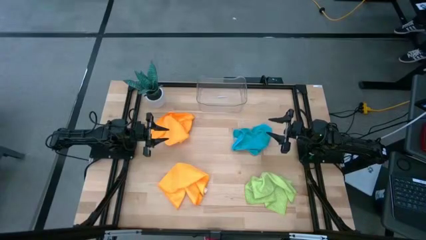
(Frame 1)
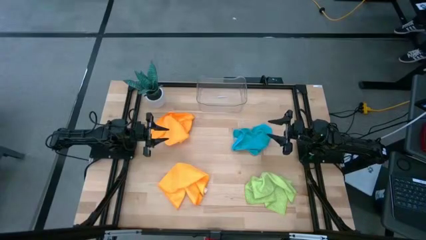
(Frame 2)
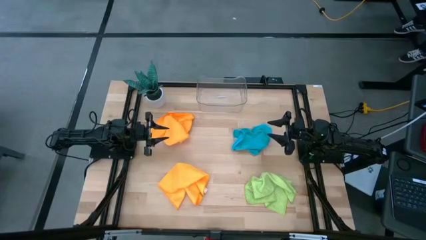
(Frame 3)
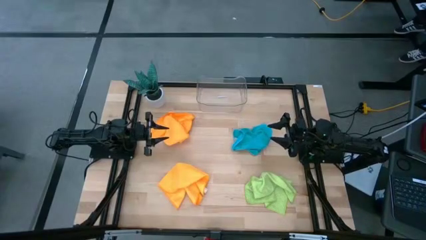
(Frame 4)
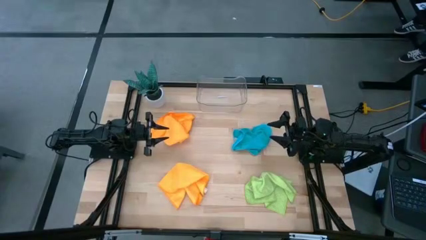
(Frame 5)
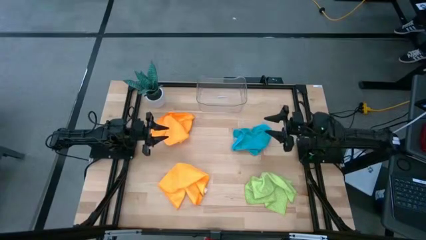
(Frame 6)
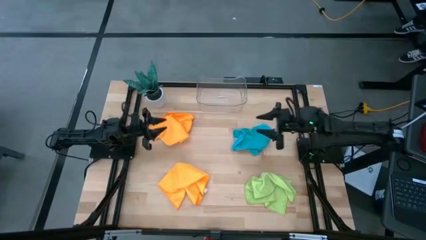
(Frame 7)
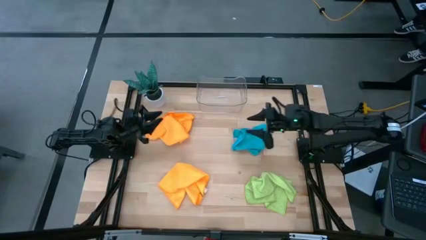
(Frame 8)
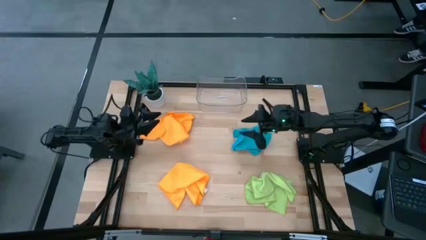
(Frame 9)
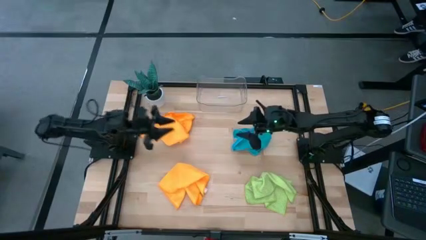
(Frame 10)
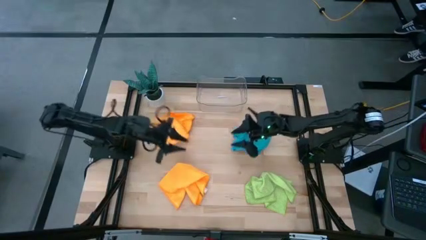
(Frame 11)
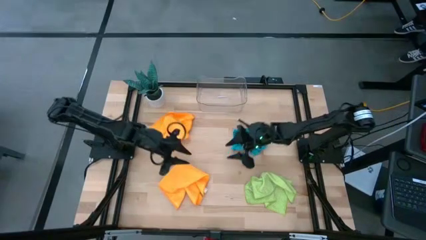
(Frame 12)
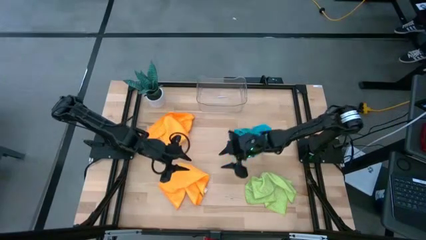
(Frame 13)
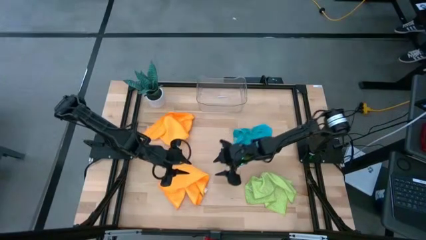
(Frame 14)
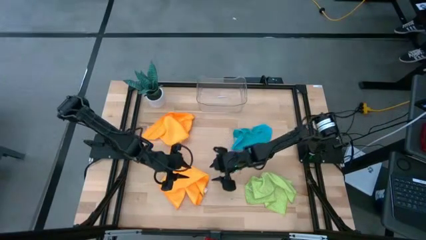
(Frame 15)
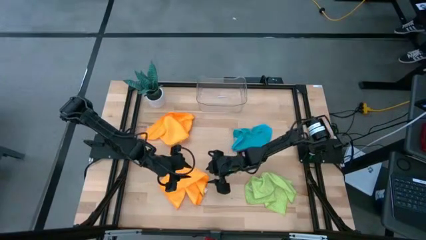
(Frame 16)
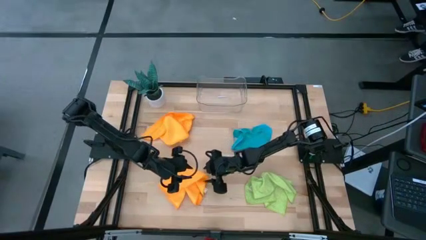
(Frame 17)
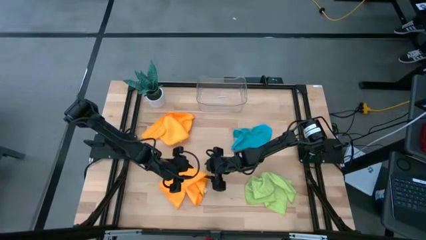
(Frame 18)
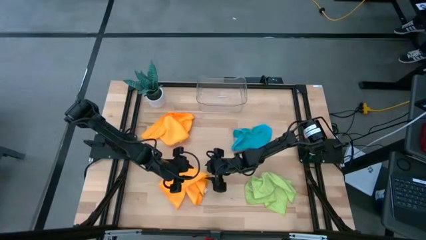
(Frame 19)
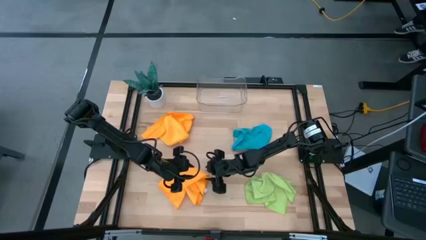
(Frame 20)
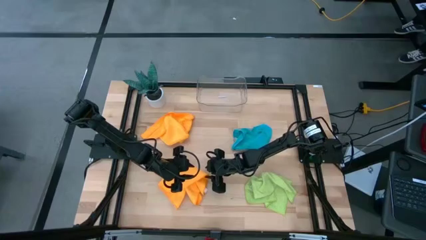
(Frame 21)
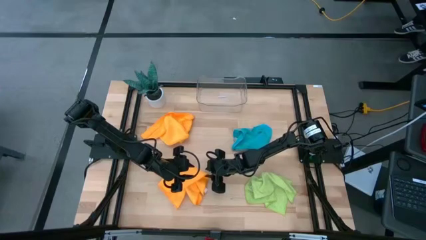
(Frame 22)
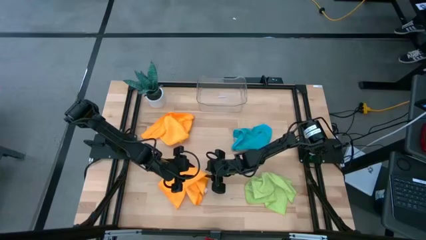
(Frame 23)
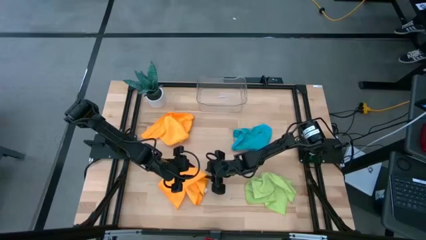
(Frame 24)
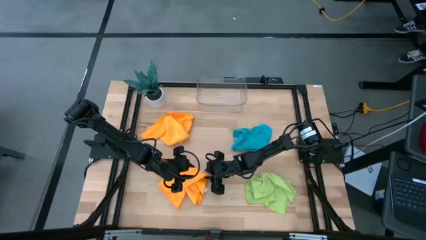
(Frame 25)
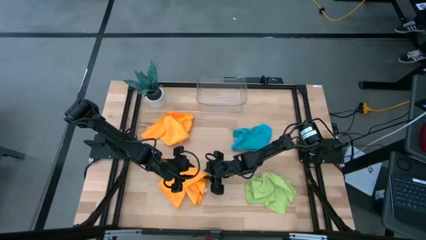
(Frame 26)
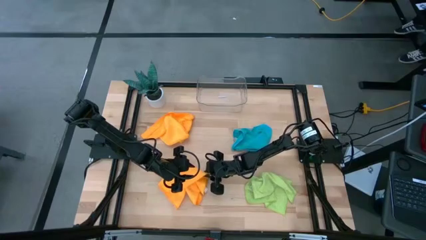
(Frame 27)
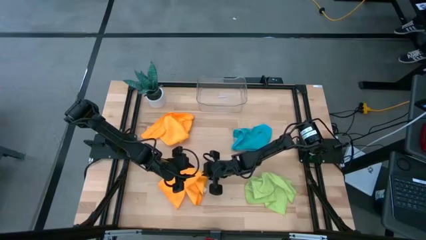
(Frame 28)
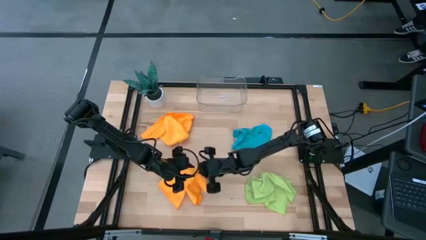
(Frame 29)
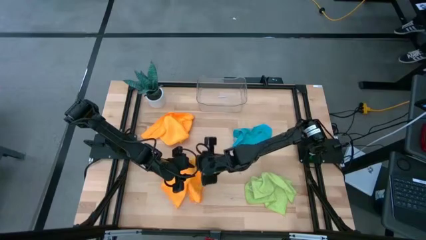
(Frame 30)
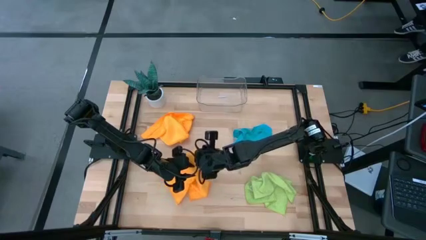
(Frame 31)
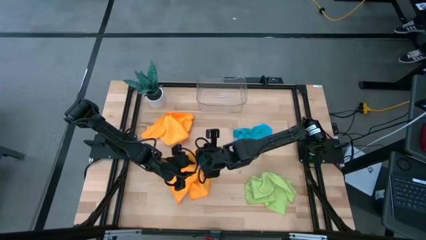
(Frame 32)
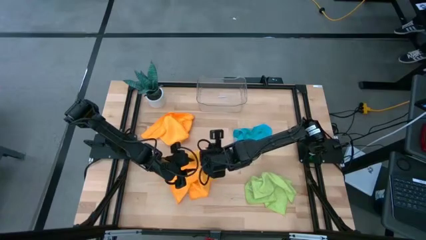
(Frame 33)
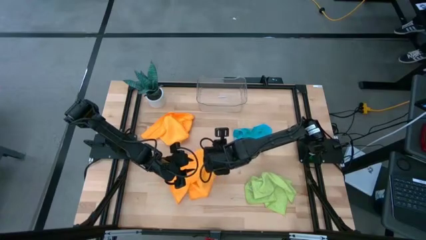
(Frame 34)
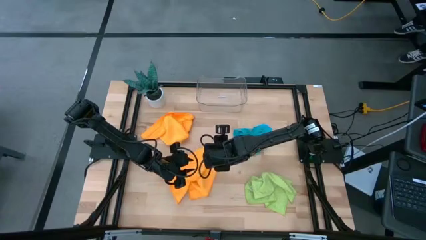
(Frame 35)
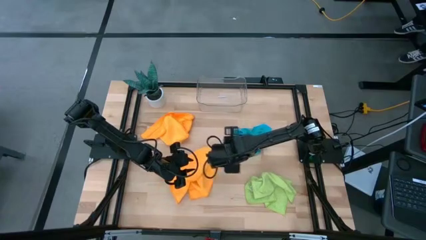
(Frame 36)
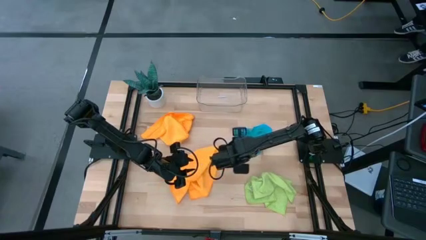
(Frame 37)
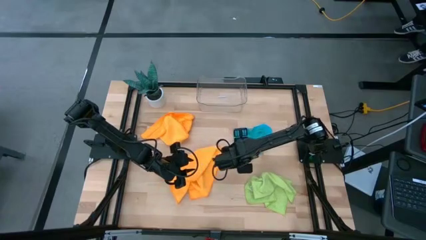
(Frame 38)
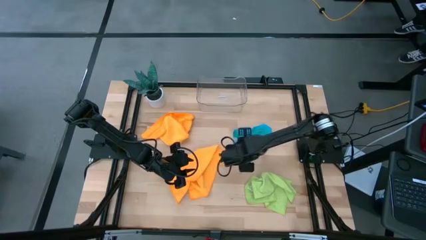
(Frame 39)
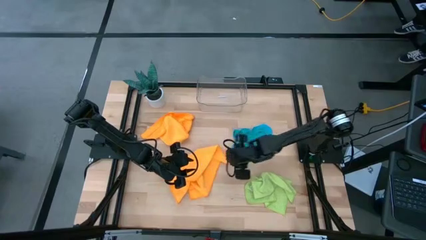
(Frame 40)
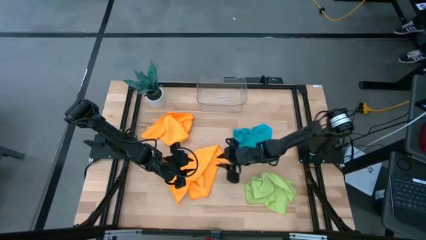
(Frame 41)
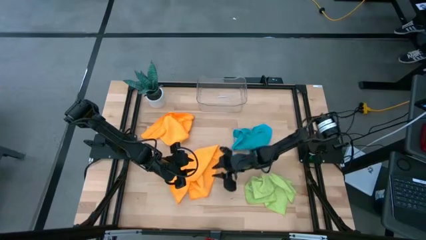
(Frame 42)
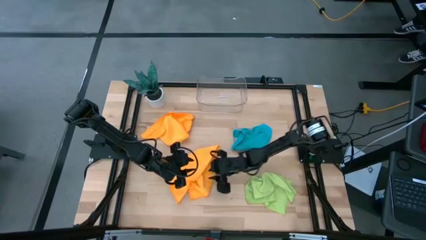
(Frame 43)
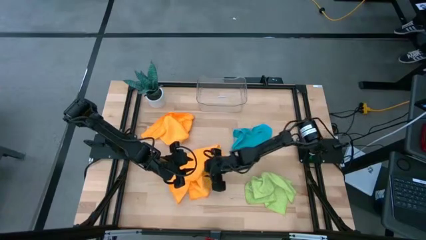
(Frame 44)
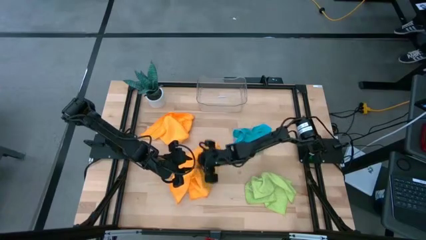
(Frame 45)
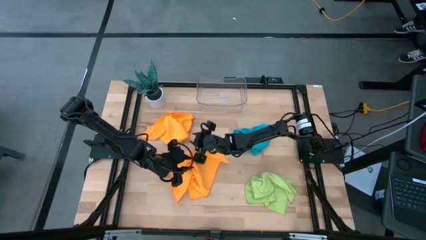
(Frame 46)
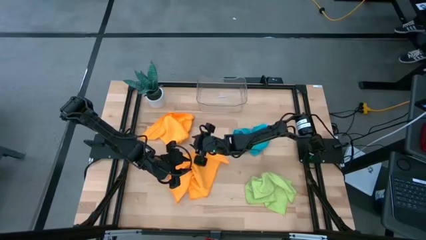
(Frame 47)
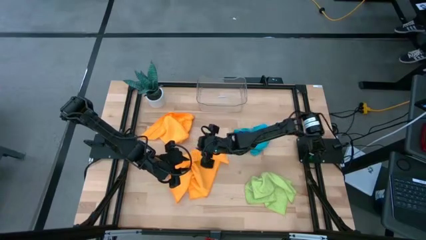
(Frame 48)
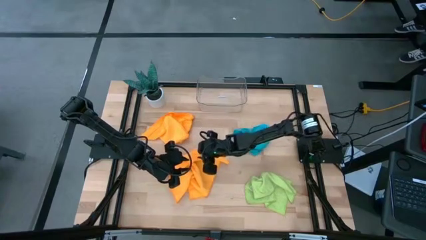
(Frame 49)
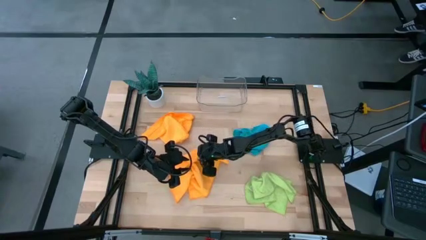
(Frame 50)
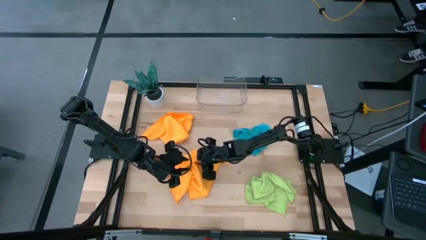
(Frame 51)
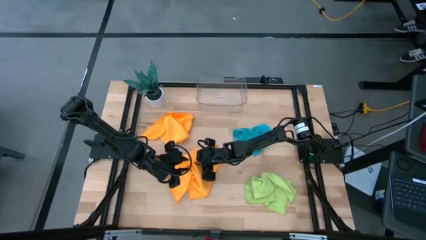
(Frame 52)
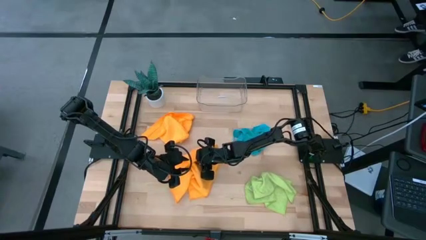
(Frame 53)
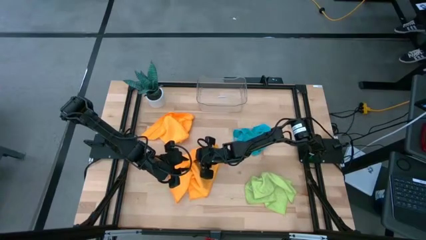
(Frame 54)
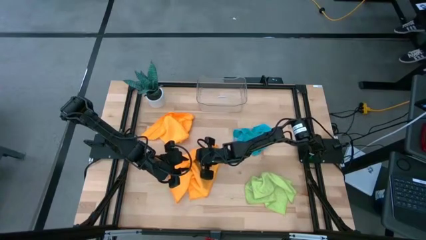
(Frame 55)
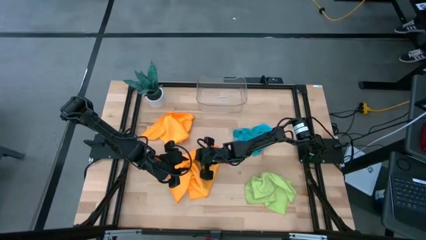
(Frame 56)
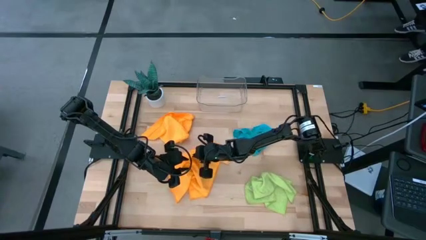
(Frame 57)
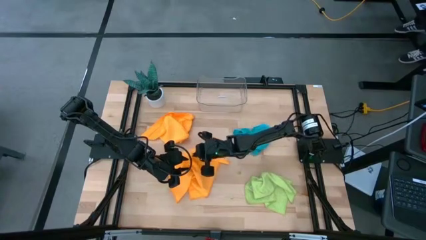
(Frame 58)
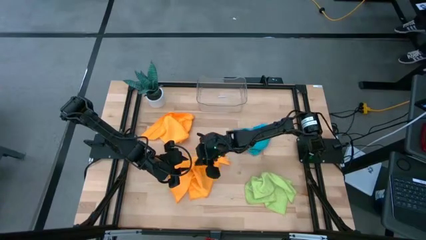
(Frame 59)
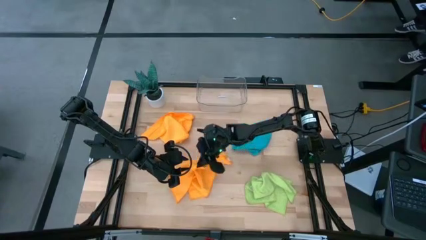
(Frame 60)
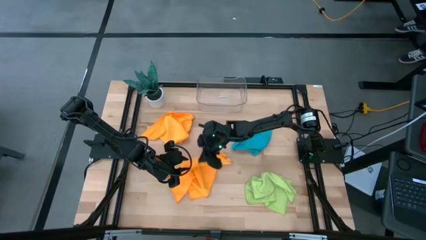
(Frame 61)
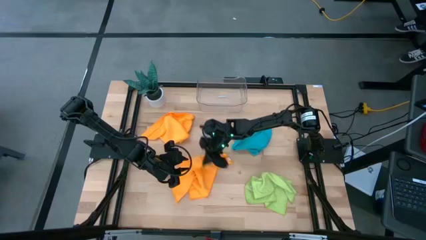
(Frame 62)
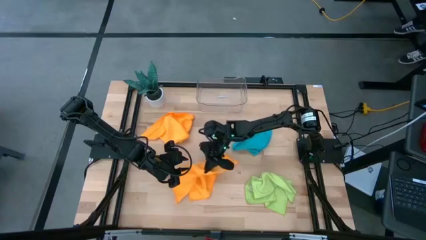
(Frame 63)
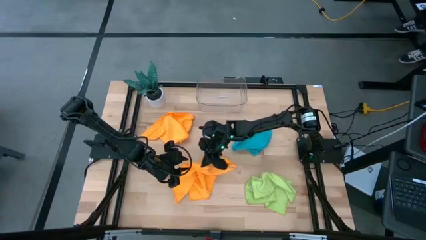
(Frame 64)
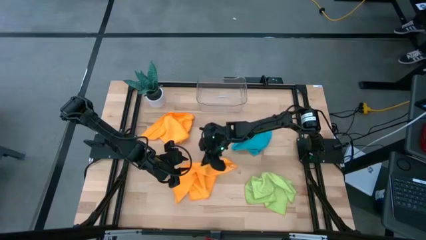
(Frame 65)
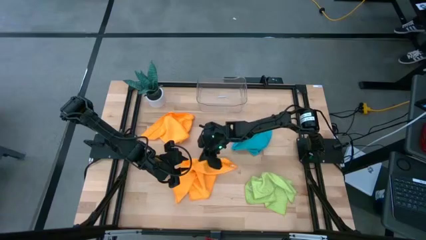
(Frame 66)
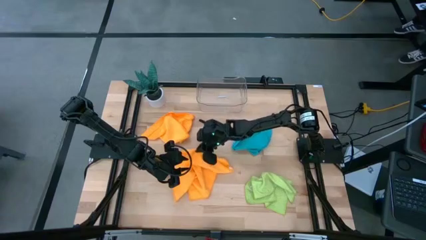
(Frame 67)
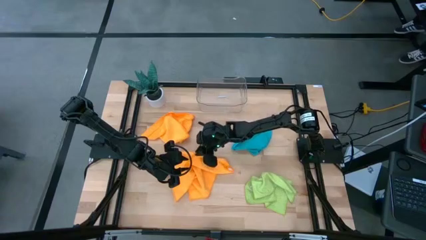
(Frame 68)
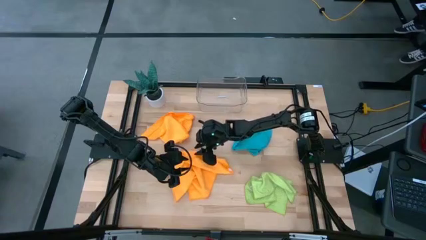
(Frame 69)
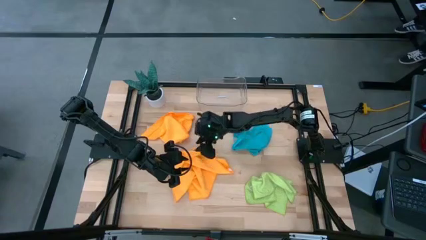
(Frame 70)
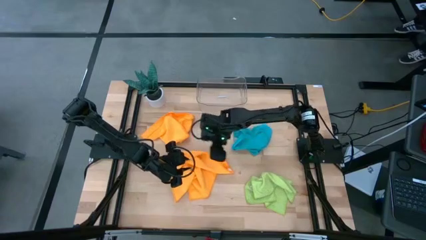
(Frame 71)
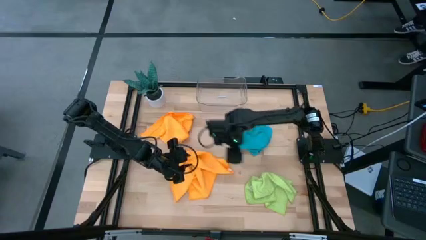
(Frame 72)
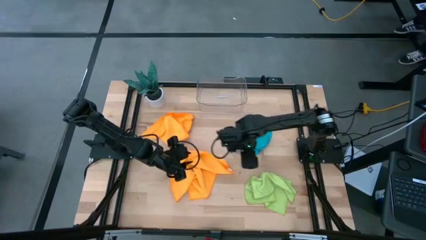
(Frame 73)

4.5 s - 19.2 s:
Task: Fold microfiber towels
Fold the bottom orange microfiber towel
